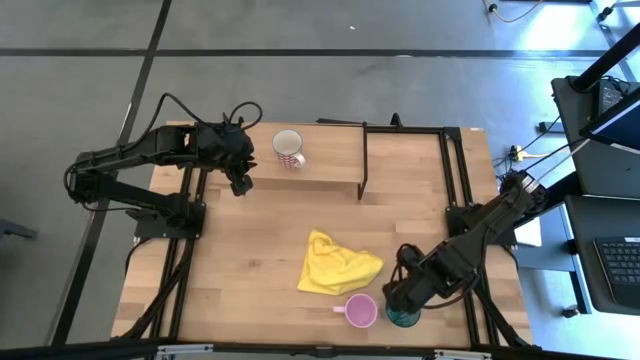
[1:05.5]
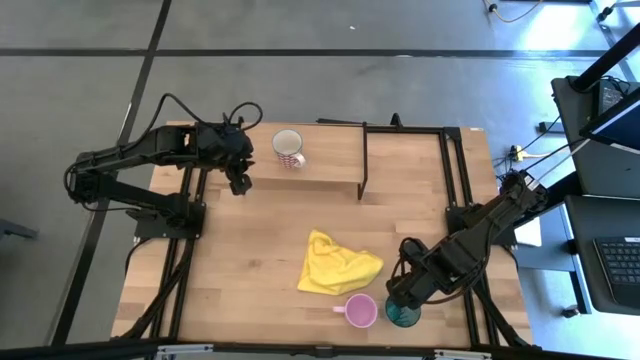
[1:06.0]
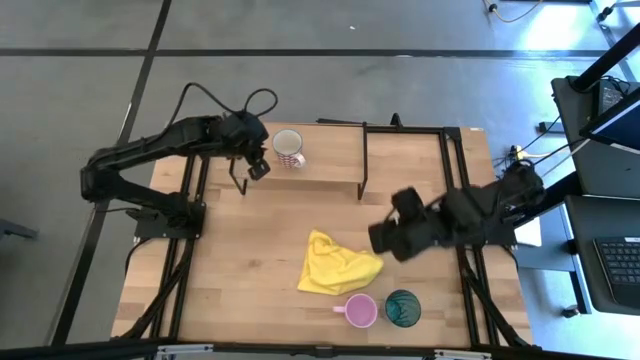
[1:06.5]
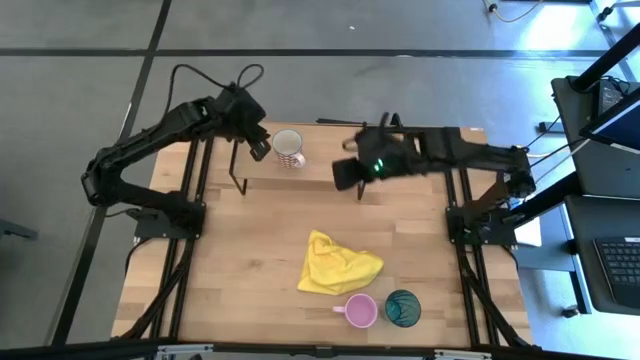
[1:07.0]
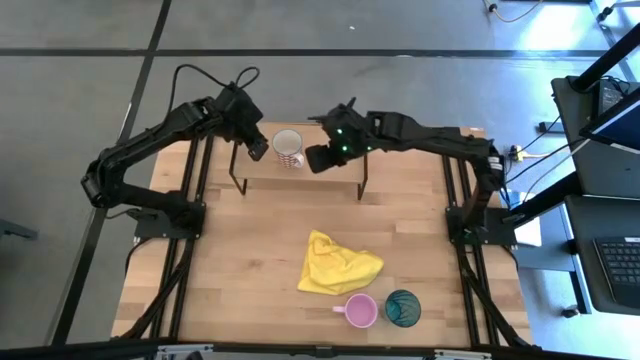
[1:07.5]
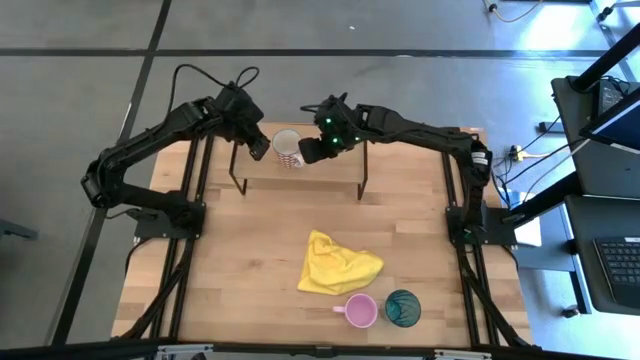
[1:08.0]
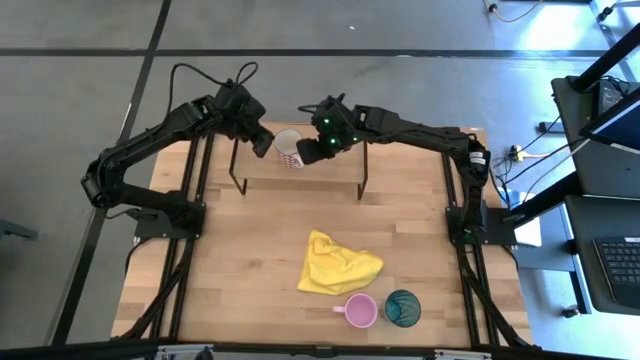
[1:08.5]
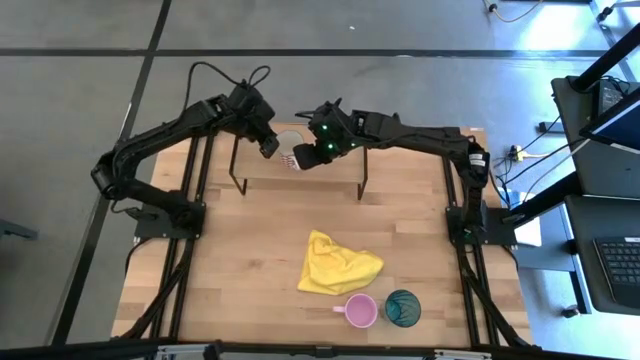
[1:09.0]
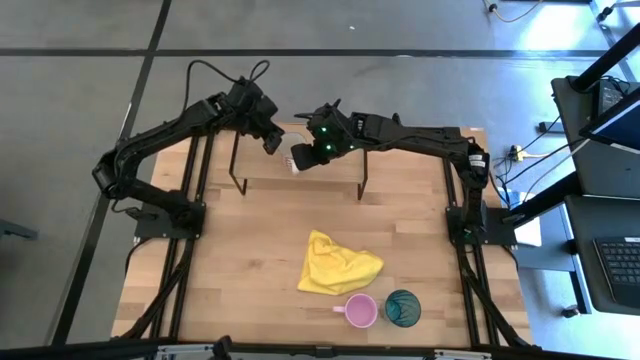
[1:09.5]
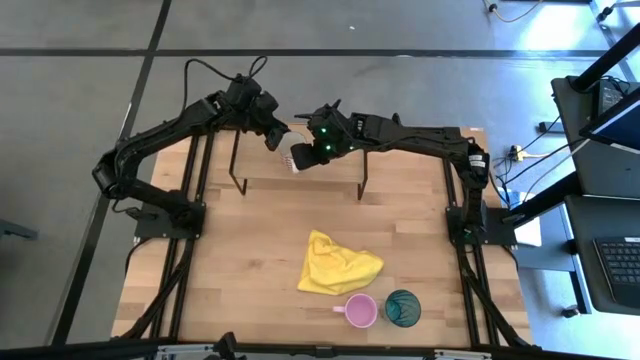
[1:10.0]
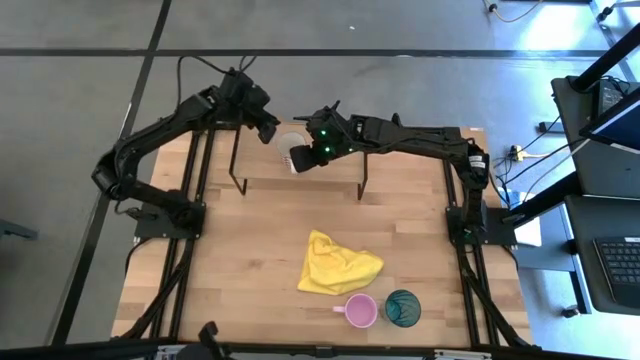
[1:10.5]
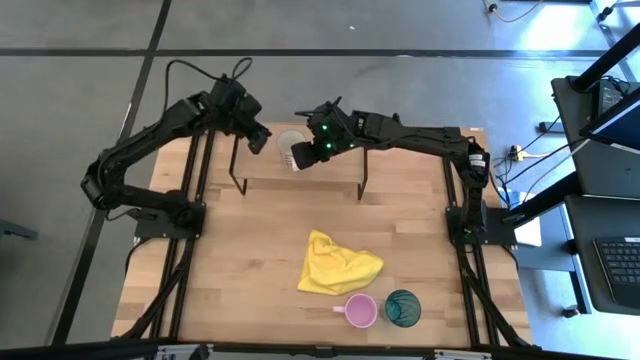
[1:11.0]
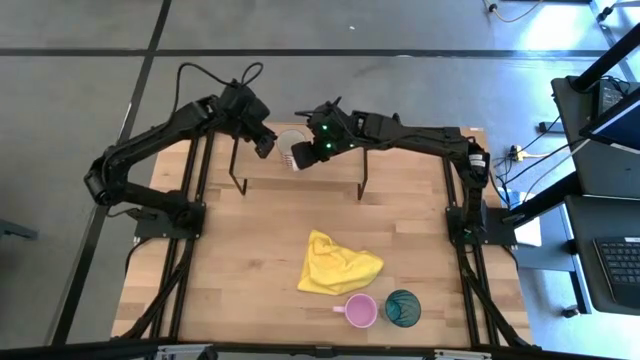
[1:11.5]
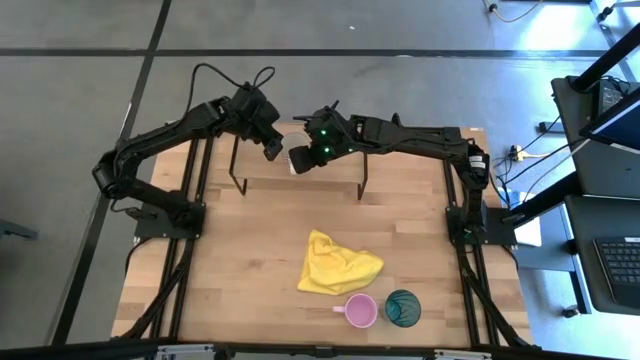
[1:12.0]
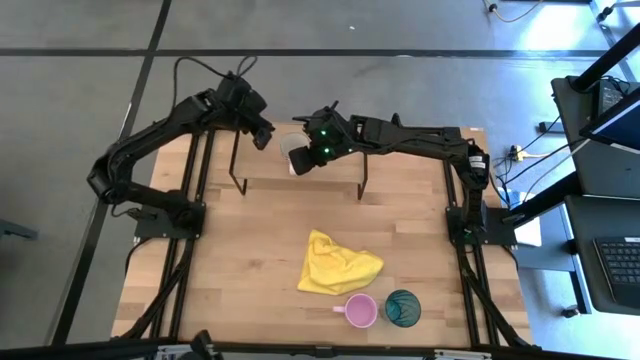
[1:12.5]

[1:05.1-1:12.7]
Task: Stack small to large cups/mugs on shelf
Adjust the red patterned mug on the shelf

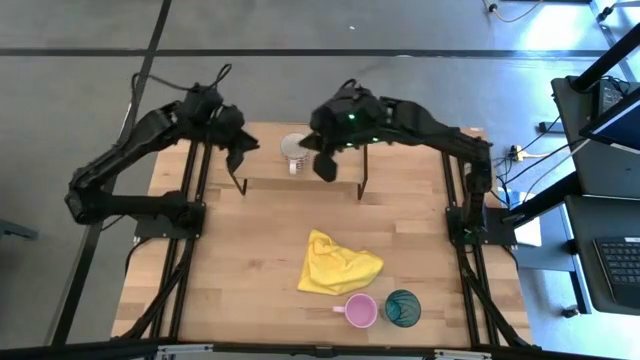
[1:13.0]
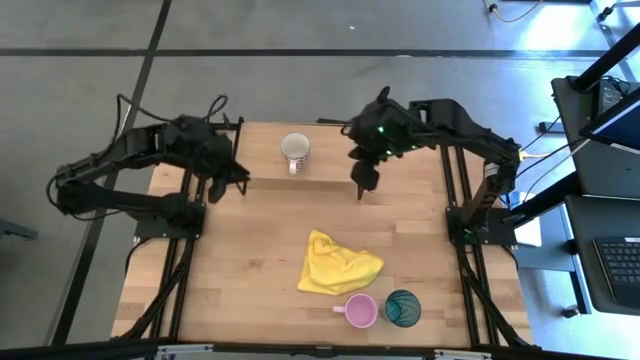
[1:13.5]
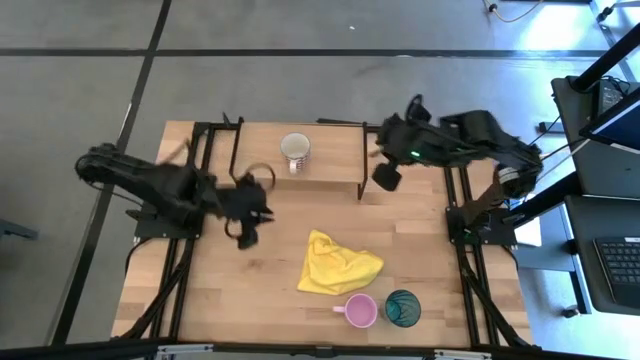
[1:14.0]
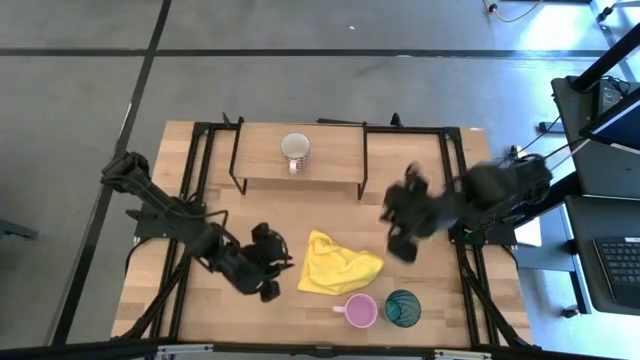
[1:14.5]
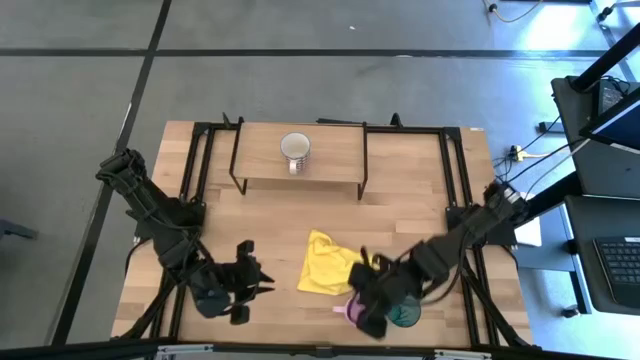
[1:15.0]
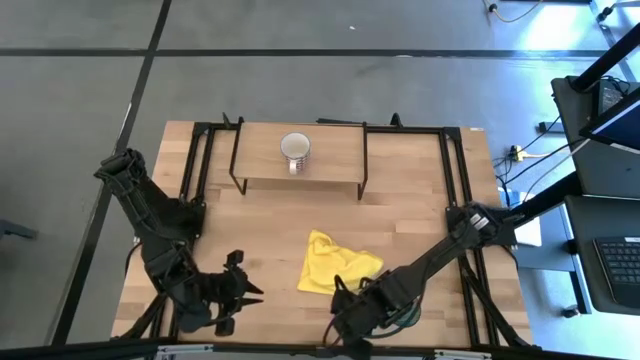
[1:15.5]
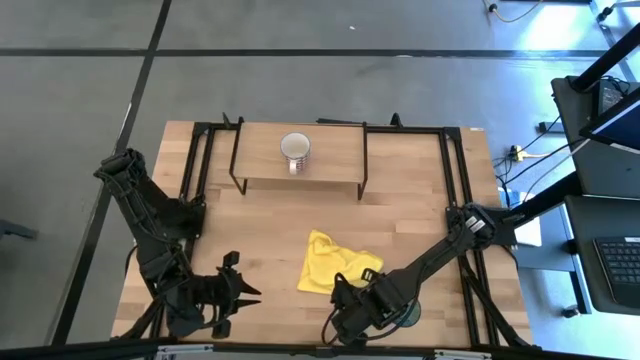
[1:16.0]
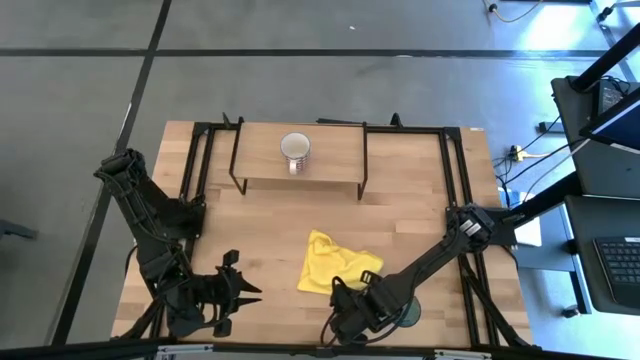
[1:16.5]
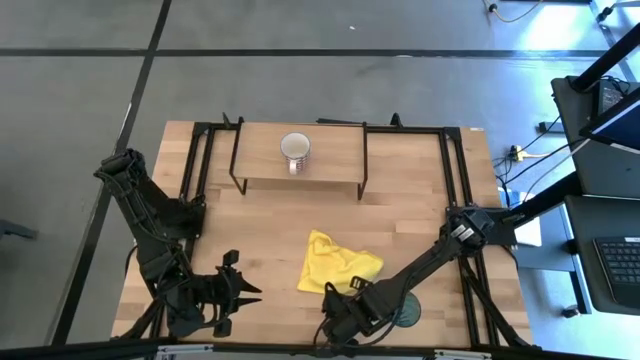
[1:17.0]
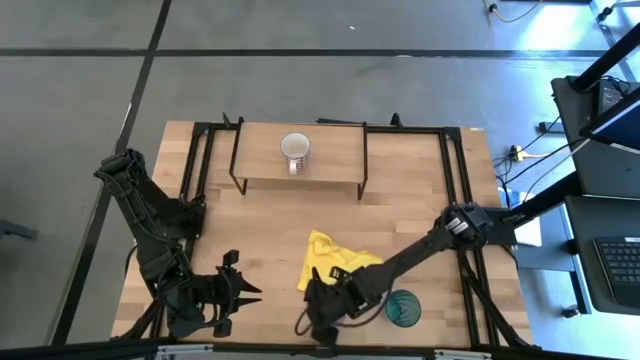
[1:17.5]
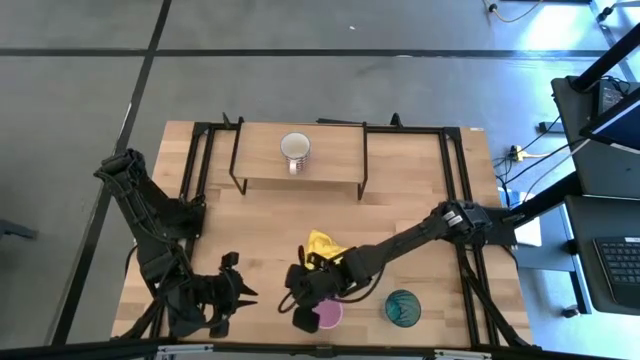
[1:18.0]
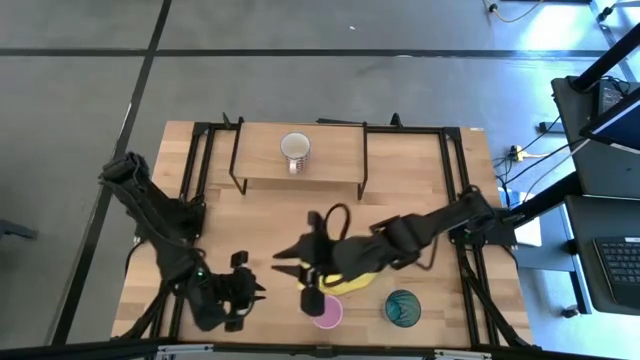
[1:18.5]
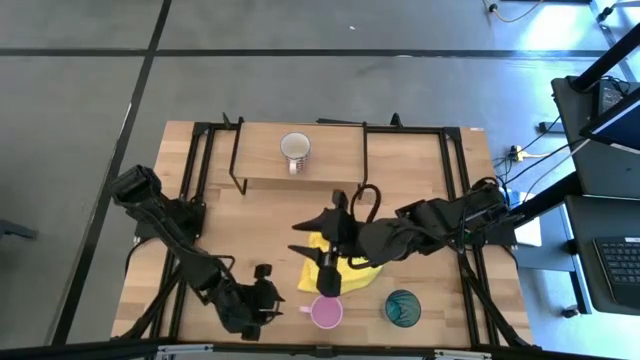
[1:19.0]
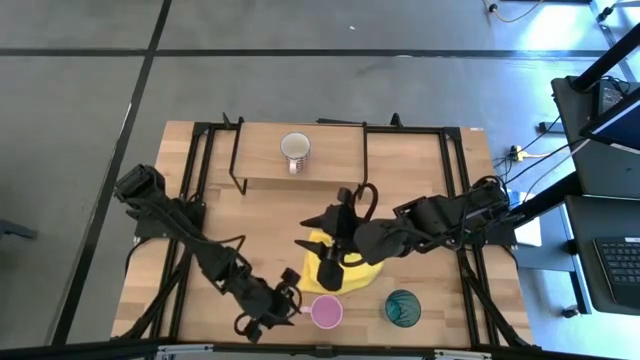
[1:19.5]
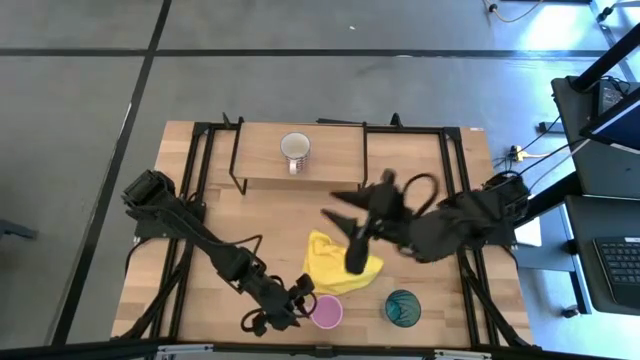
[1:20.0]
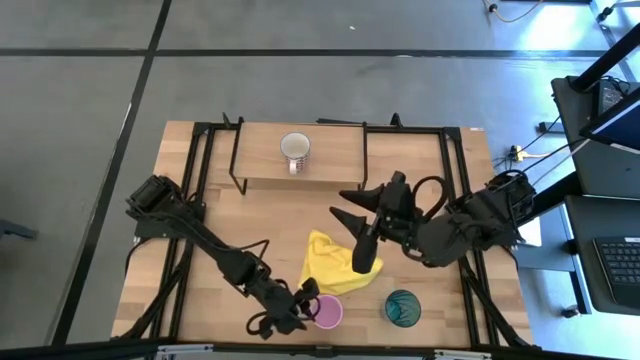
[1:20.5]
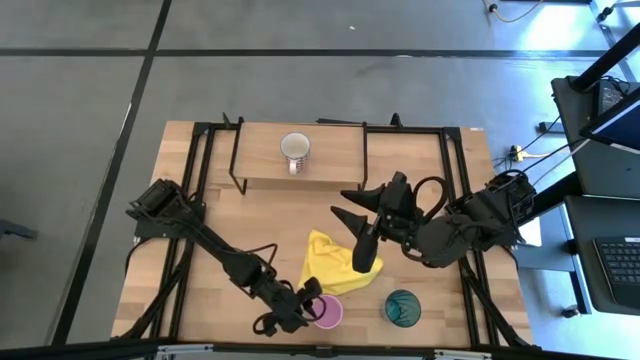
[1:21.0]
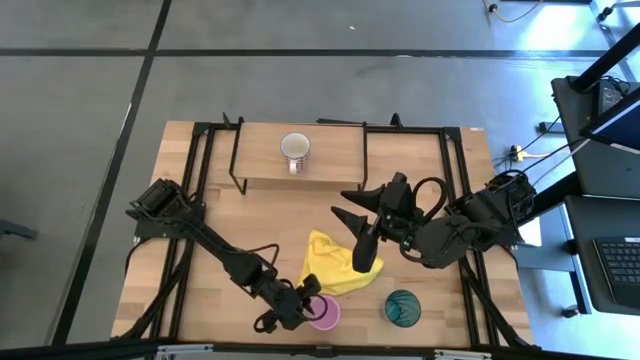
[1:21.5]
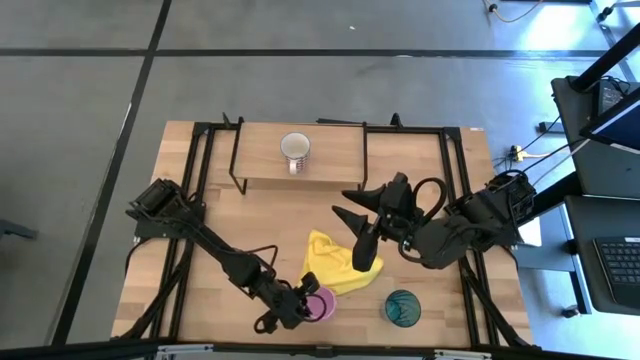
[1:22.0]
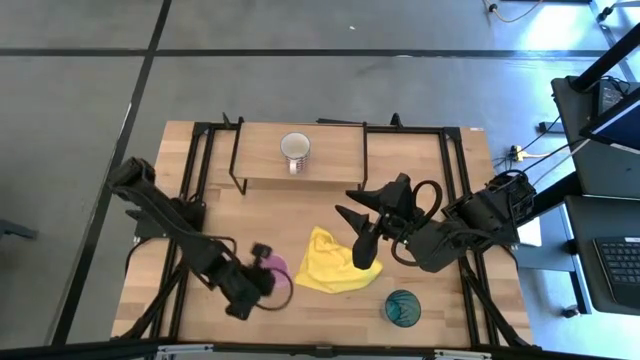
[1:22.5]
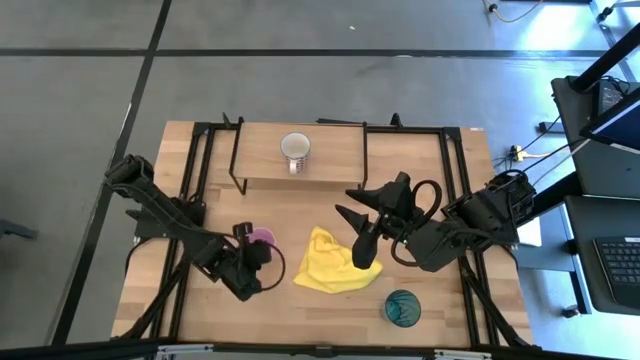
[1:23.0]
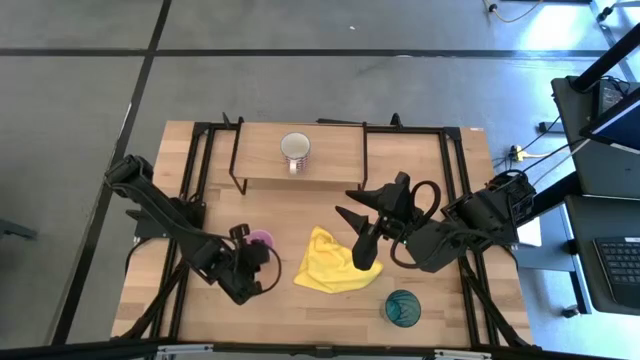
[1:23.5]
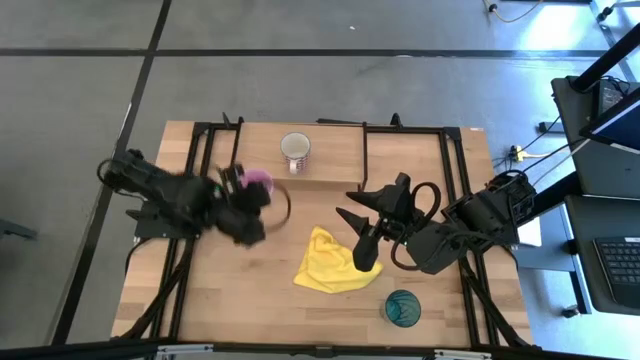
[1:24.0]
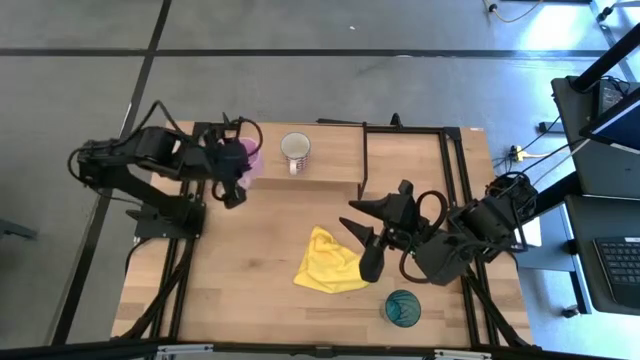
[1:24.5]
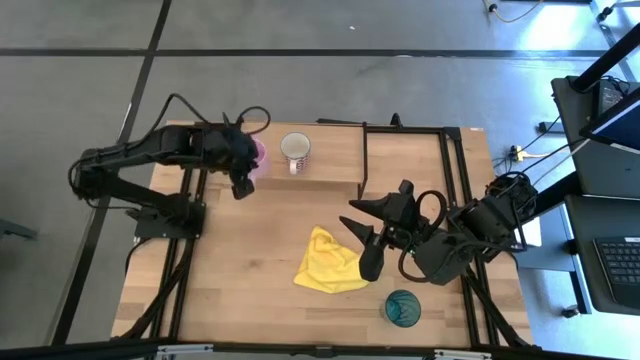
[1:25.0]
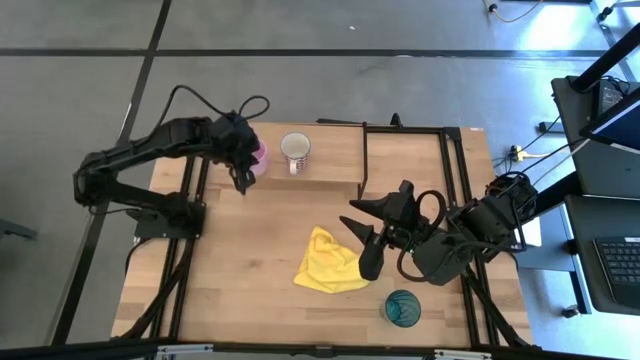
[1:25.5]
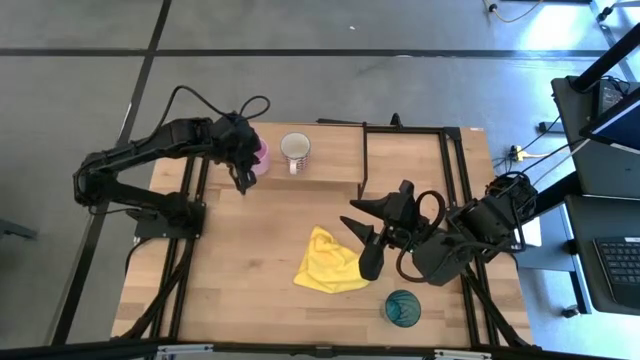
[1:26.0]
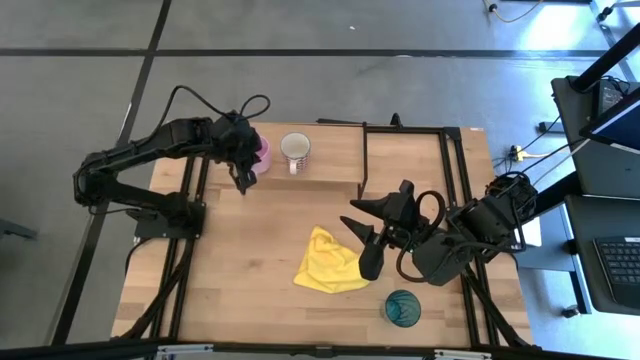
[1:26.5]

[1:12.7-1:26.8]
Put the pink mug on the shelf
